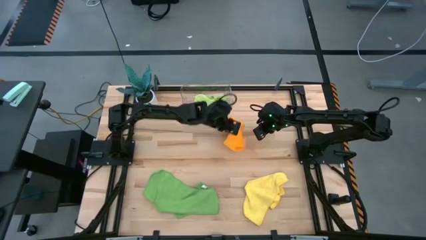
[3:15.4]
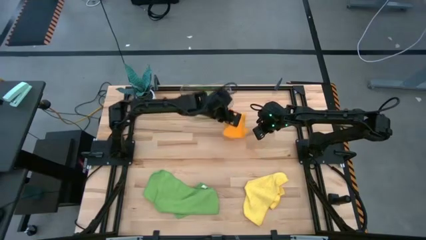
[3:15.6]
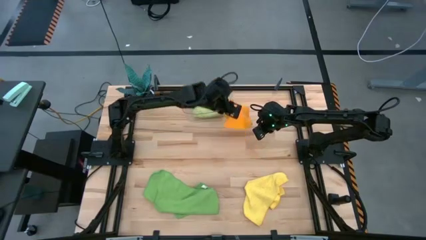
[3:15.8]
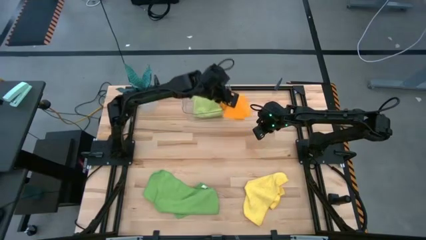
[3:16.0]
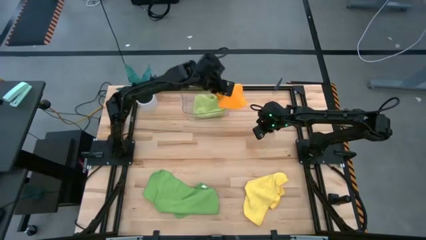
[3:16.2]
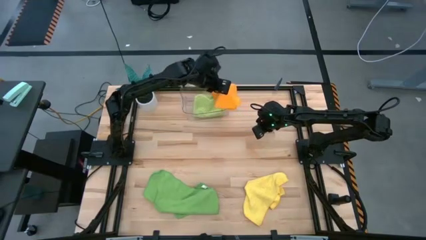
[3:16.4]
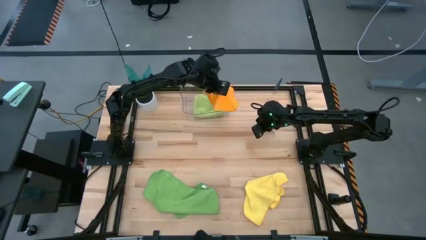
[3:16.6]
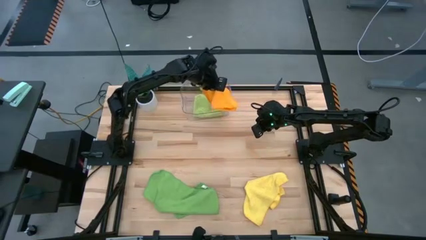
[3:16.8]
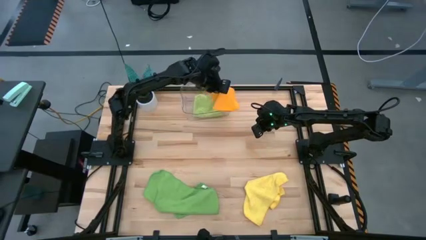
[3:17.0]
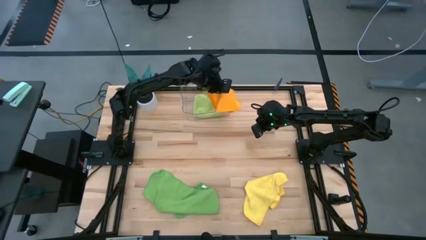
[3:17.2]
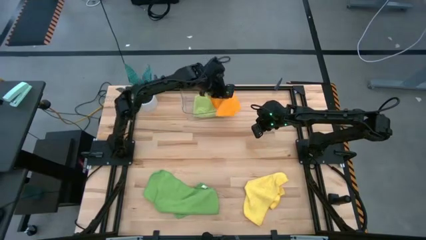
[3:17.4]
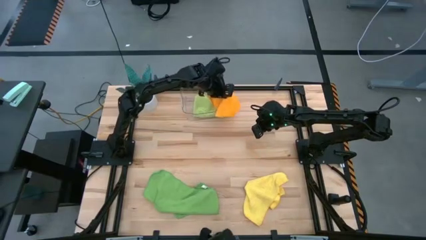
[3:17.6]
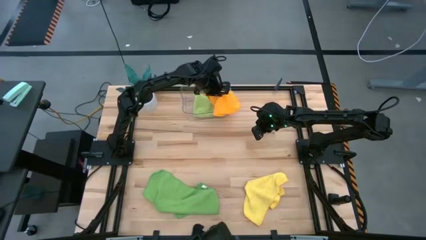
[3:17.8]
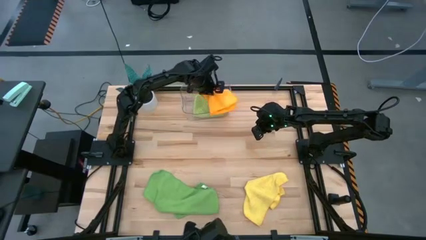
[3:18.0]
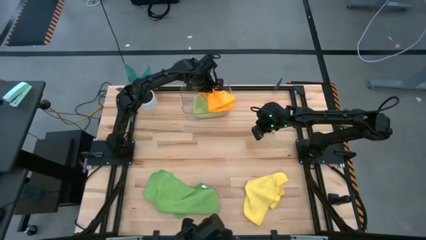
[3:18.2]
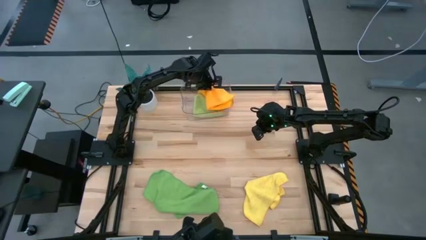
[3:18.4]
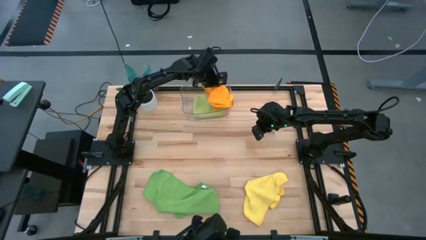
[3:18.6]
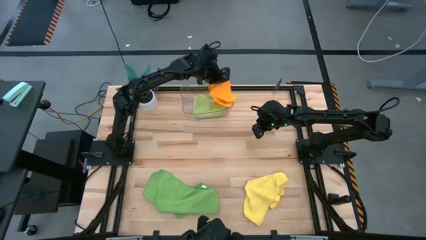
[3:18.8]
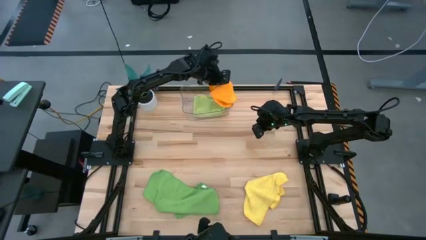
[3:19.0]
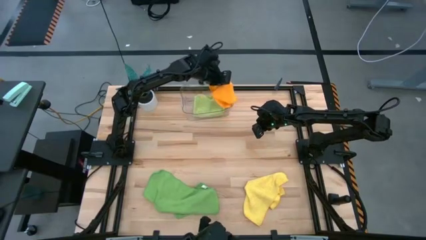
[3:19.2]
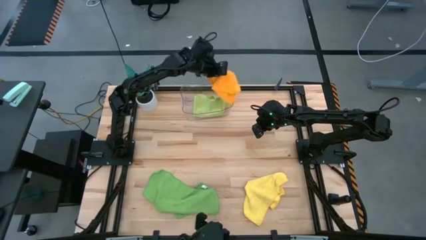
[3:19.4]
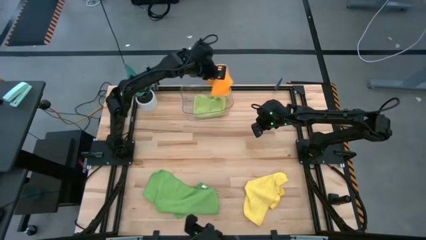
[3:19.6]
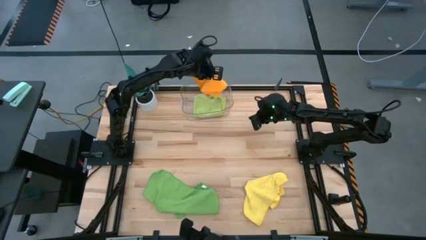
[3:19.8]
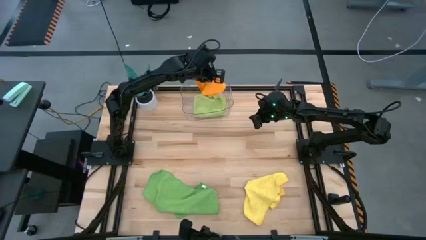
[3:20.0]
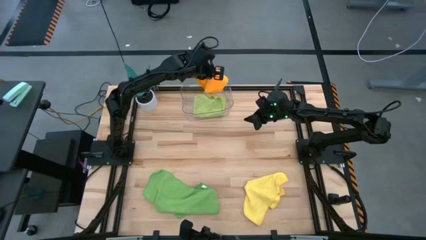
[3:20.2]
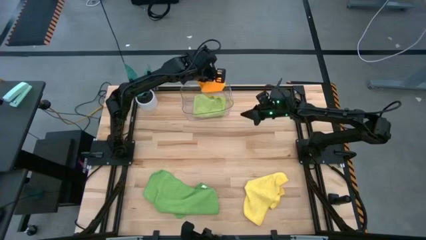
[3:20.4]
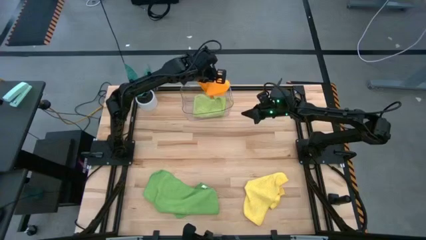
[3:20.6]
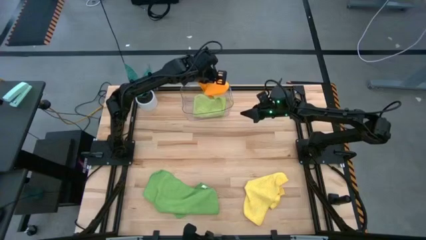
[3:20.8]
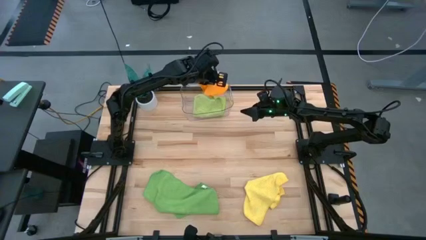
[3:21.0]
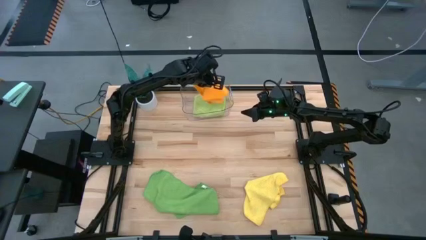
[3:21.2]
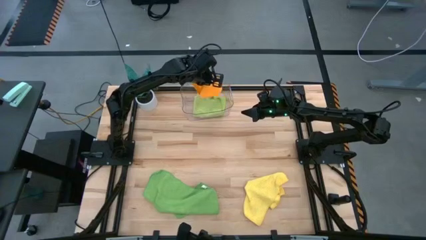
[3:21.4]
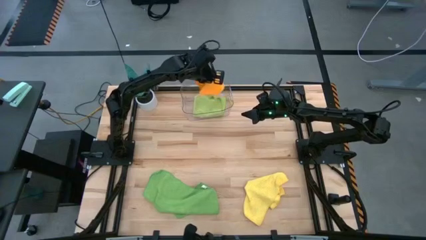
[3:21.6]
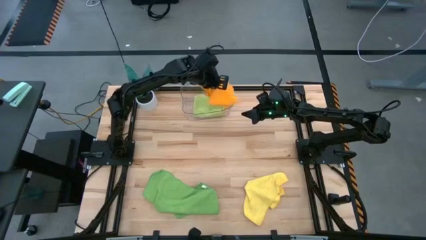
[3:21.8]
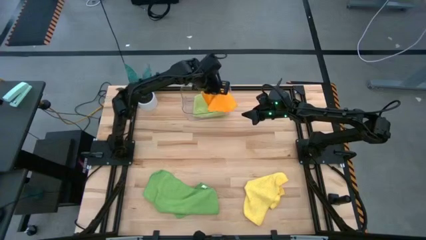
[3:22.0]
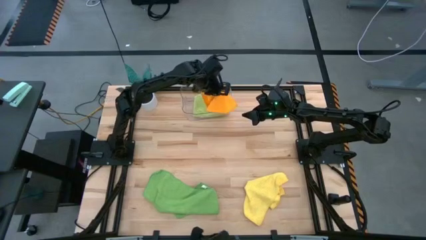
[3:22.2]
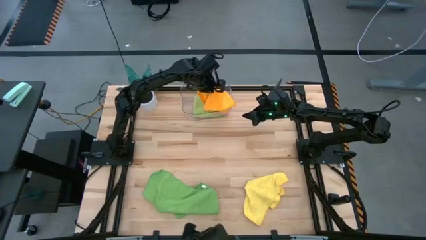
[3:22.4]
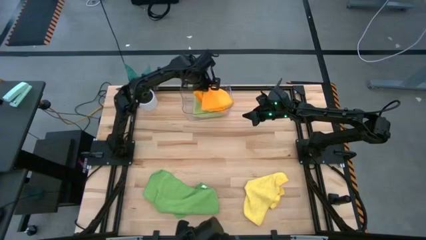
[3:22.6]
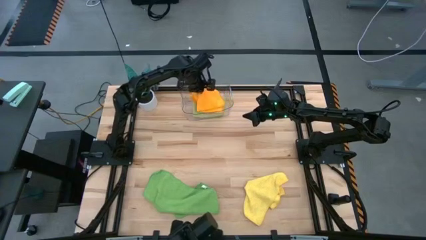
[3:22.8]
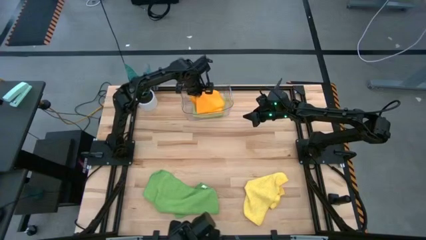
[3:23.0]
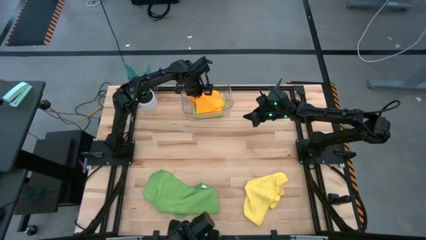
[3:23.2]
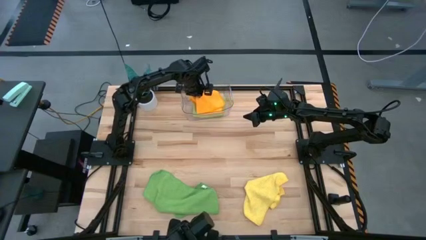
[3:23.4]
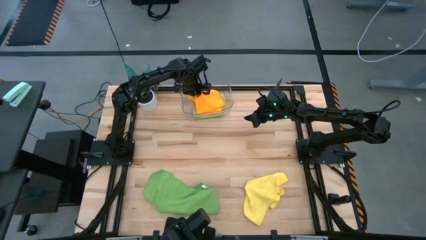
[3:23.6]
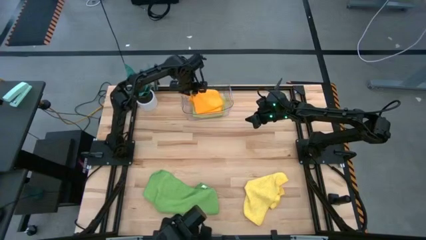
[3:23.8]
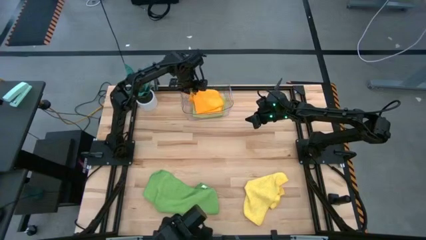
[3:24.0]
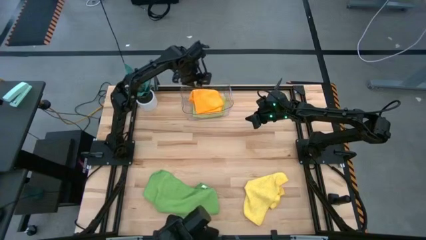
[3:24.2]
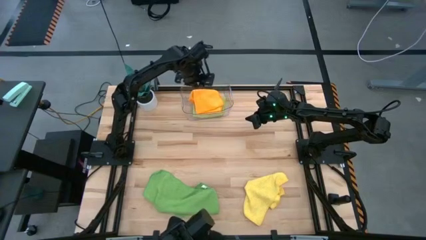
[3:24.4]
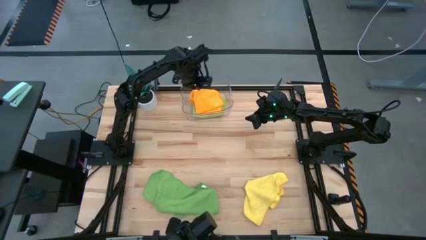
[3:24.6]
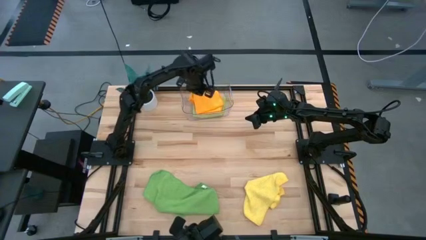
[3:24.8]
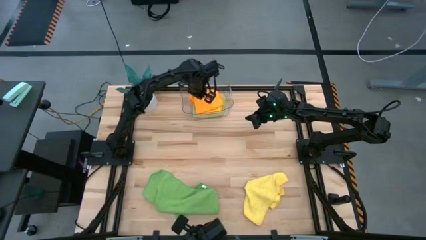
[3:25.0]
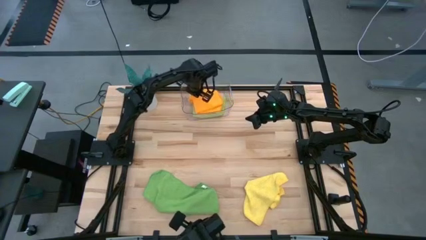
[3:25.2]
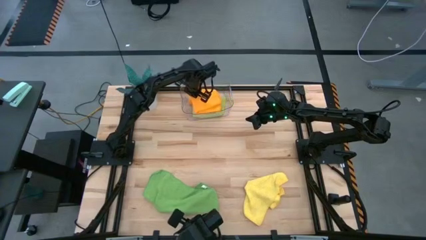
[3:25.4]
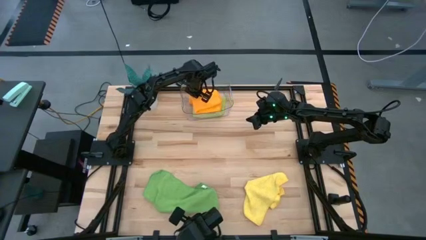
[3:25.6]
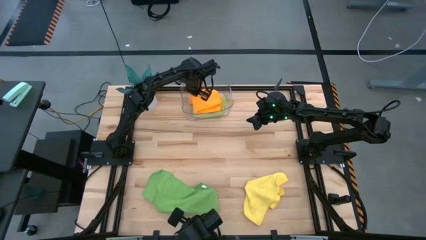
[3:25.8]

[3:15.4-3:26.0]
Task: Fold microfiber towels
Put the orange microfiber cloth into the transparent bin
